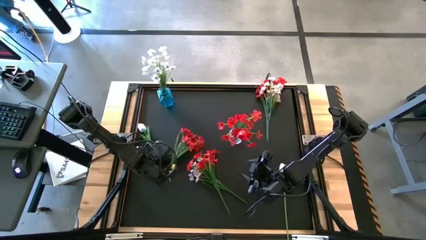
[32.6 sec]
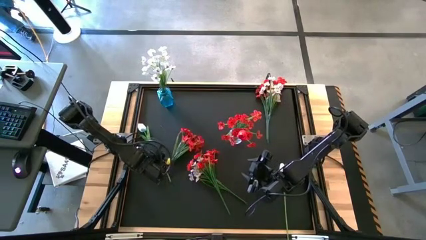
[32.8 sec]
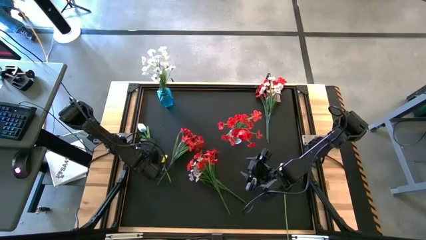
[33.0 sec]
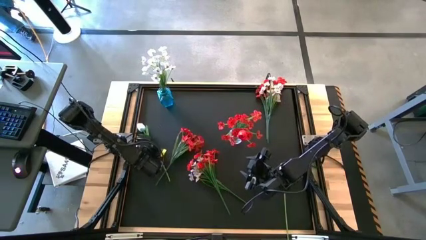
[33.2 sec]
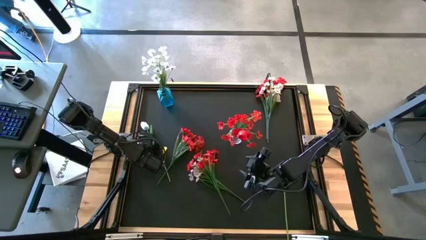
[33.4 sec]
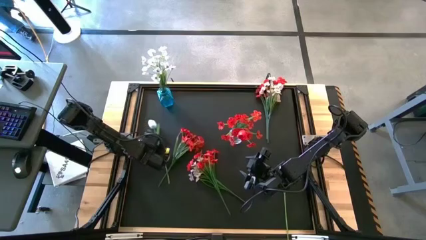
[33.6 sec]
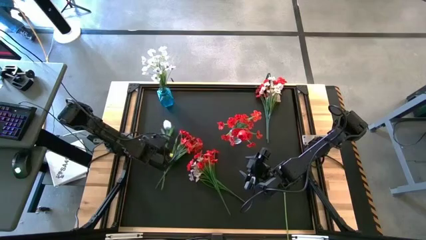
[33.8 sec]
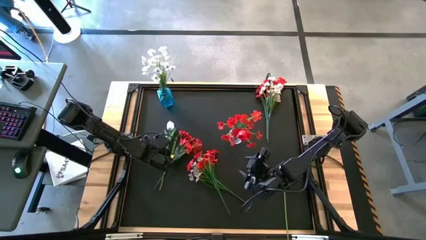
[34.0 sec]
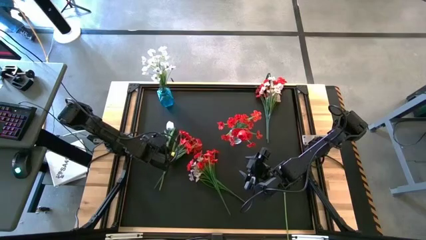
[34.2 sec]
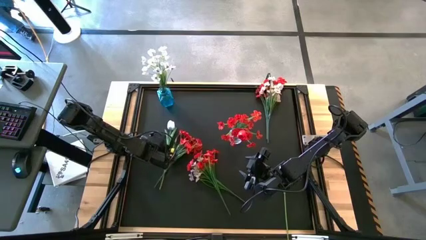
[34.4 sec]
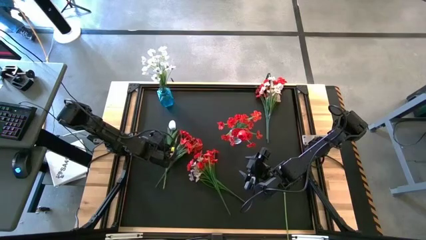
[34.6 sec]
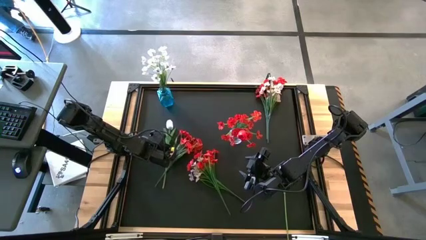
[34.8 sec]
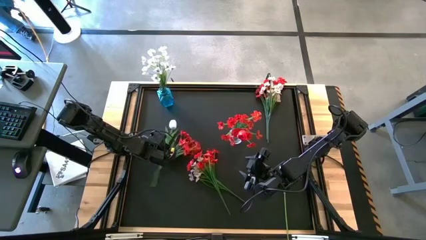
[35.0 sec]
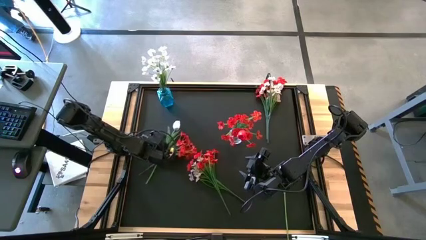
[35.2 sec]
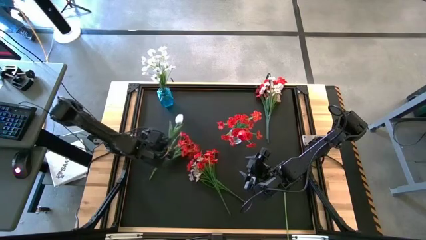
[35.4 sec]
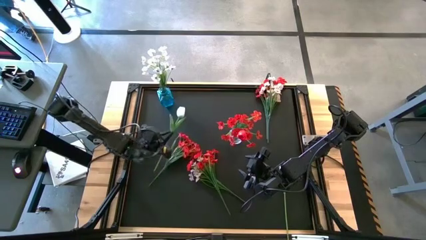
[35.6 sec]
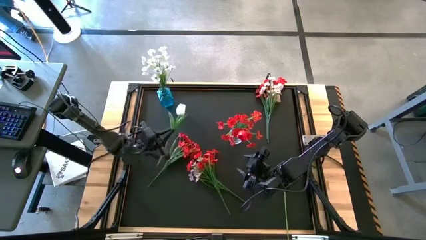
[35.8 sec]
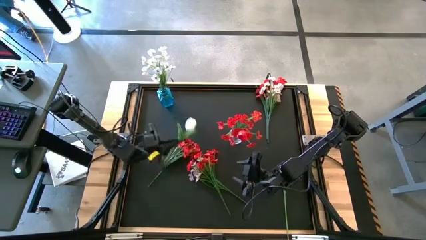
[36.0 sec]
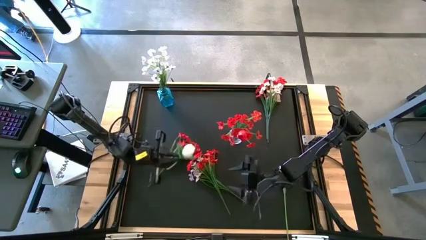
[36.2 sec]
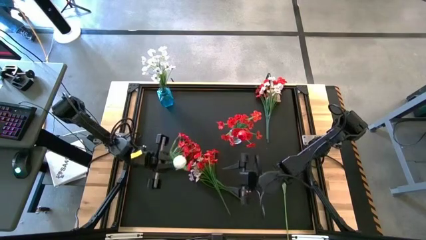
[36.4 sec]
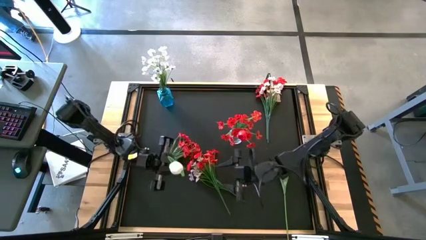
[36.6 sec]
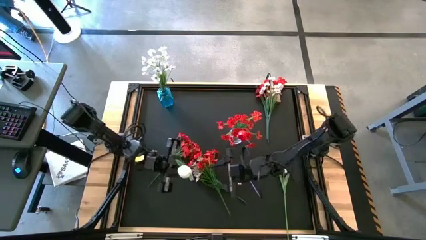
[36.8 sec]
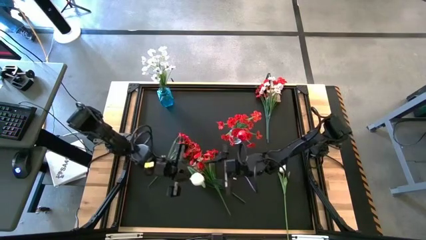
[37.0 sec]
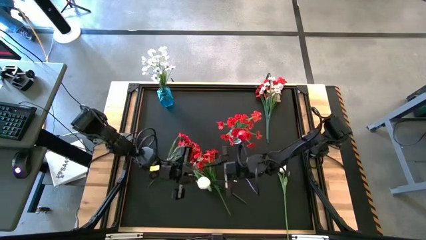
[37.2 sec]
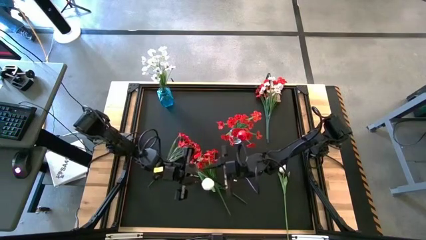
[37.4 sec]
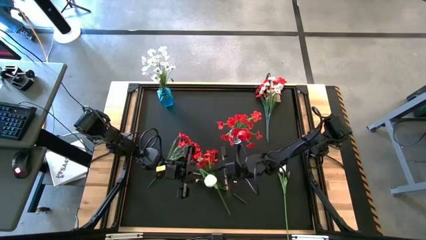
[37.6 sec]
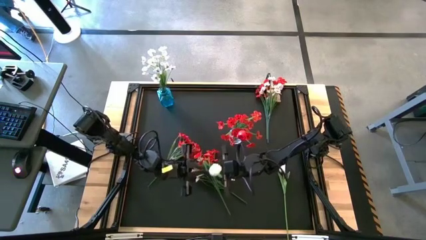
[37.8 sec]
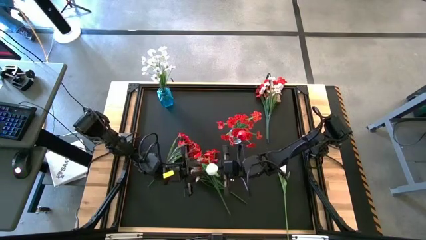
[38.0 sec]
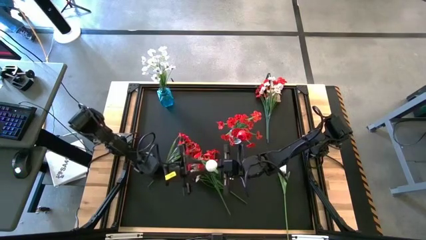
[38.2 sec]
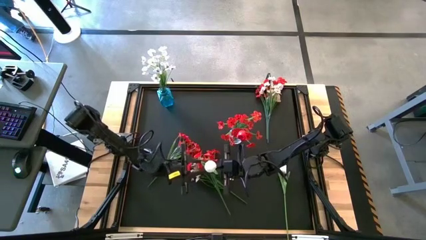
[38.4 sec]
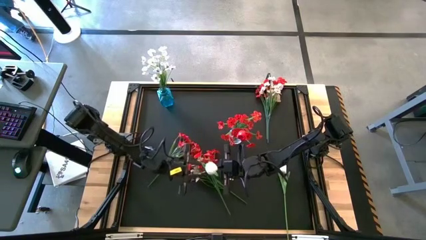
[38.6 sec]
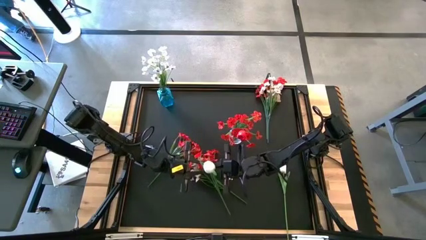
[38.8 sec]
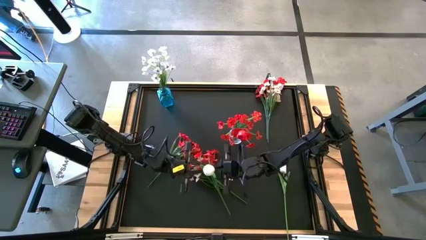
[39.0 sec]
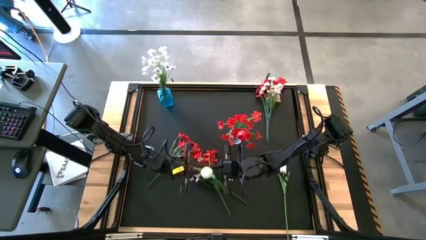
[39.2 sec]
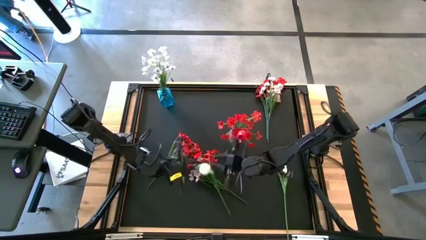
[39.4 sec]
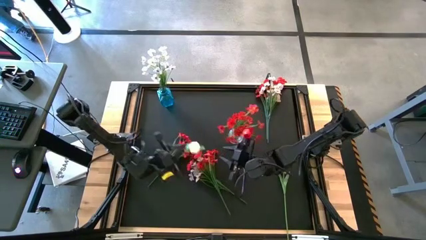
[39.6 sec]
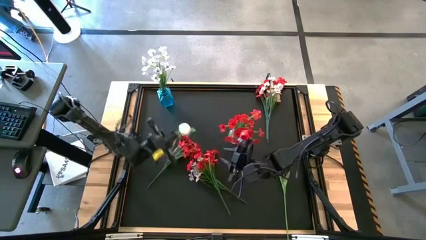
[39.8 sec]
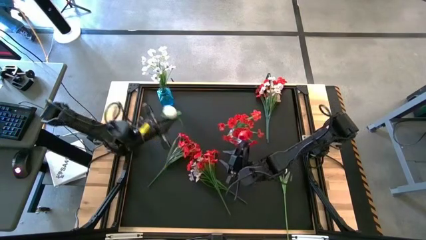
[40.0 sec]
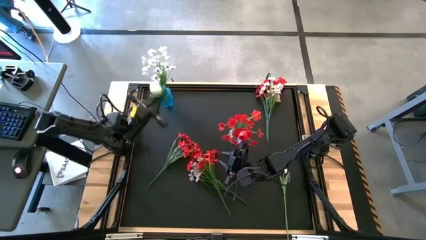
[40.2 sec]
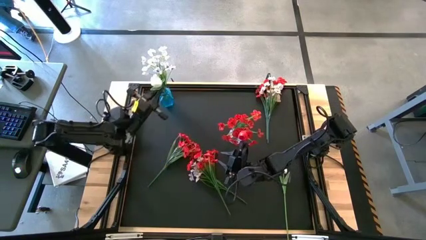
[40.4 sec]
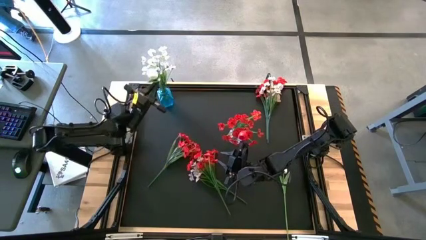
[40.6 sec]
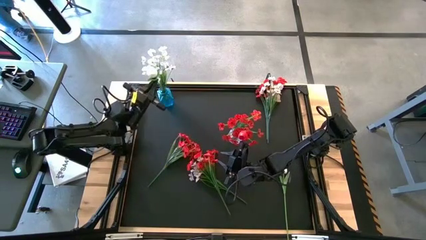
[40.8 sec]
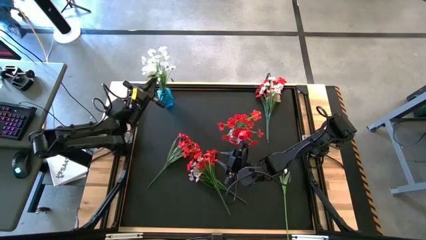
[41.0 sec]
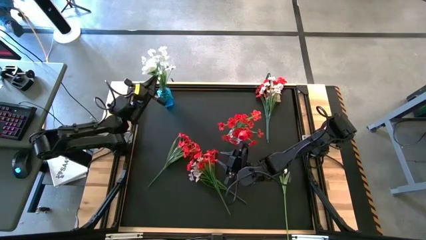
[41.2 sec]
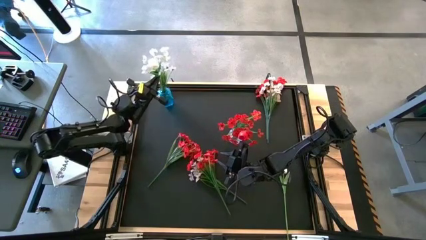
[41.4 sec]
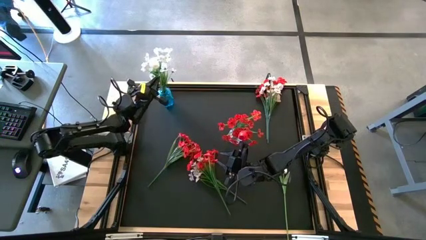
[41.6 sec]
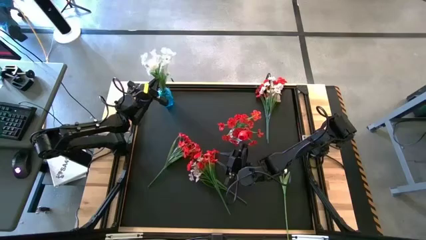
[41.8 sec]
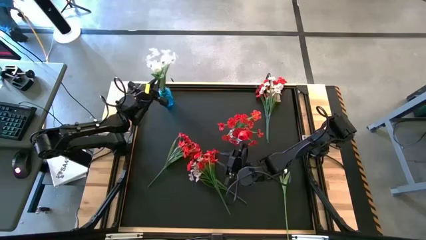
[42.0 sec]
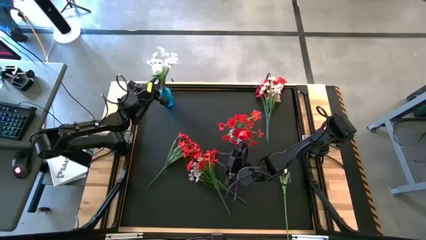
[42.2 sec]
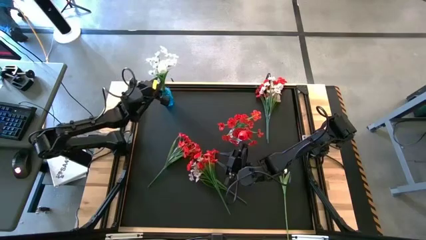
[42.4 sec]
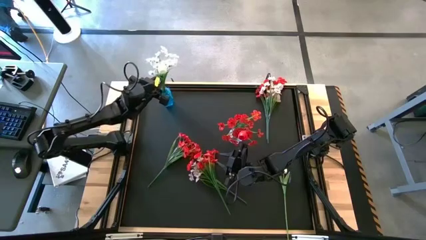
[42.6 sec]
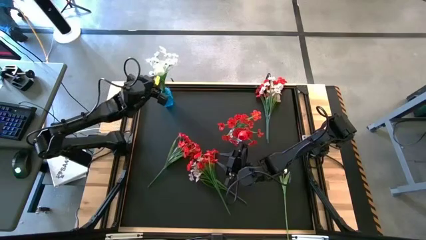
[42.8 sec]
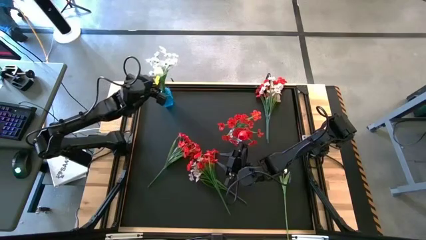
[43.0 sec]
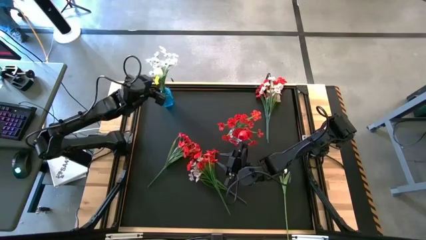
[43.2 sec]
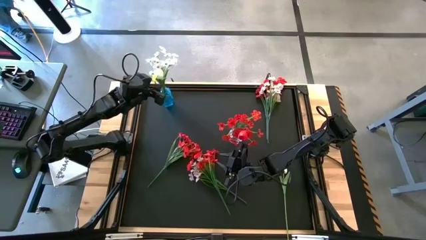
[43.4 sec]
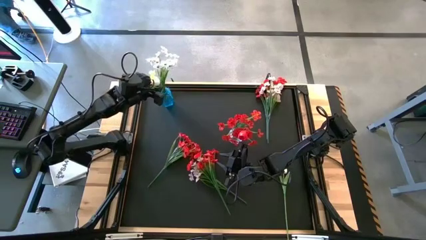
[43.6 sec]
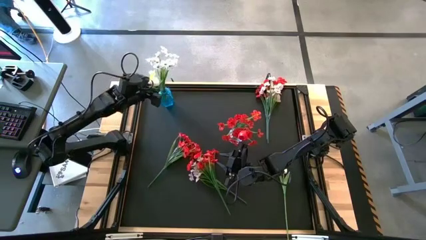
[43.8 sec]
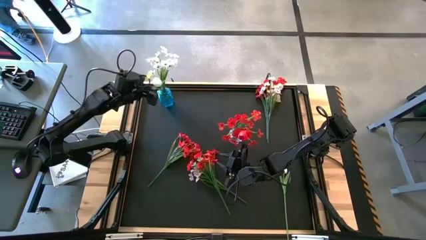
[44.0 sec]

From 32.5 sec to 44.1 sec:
Task: Sort flowers into vase by color
Put the left white flower into the blue vase

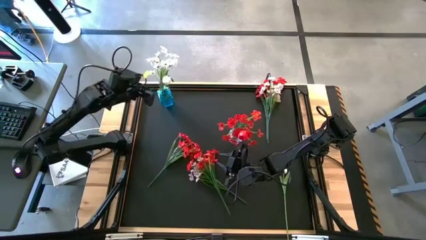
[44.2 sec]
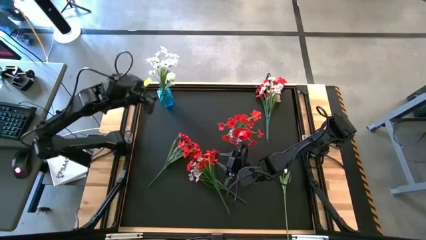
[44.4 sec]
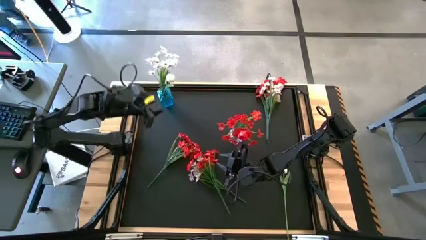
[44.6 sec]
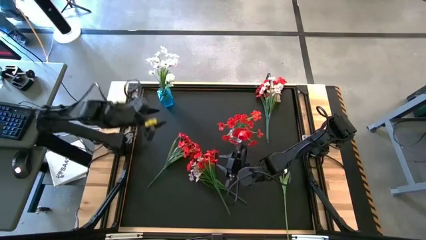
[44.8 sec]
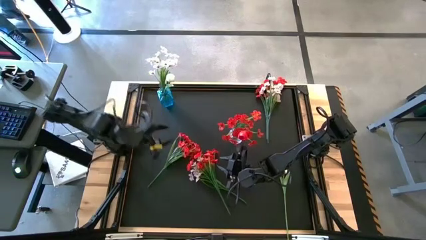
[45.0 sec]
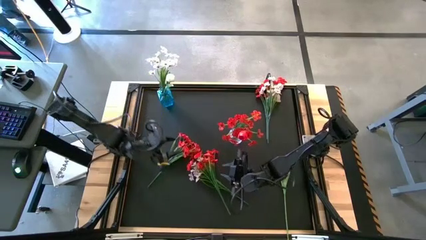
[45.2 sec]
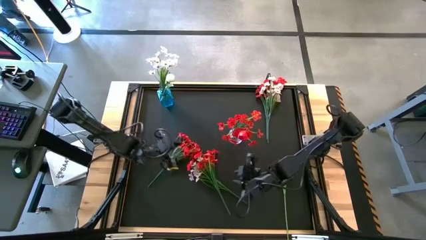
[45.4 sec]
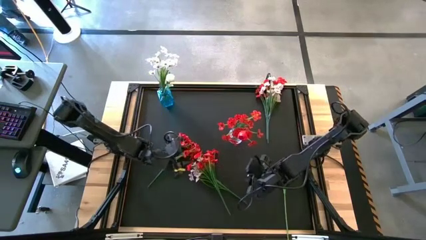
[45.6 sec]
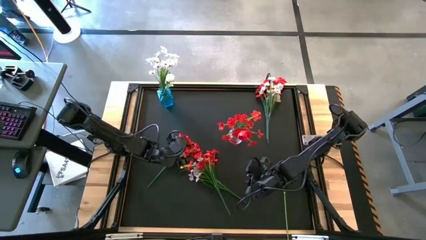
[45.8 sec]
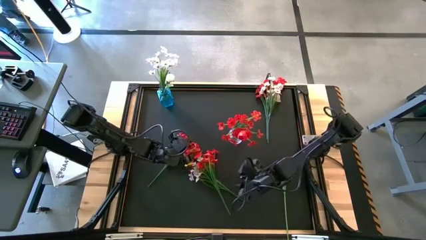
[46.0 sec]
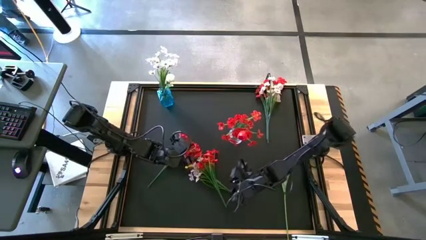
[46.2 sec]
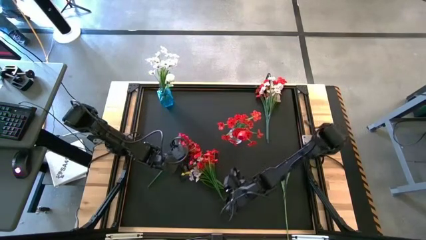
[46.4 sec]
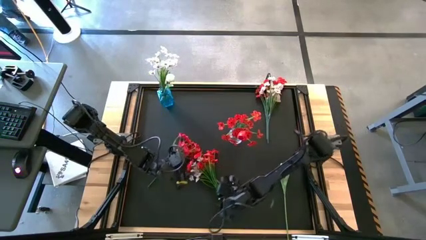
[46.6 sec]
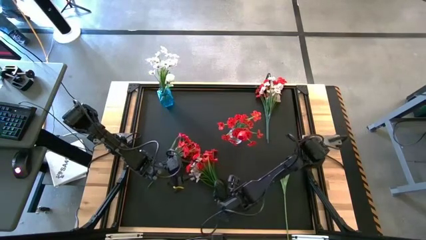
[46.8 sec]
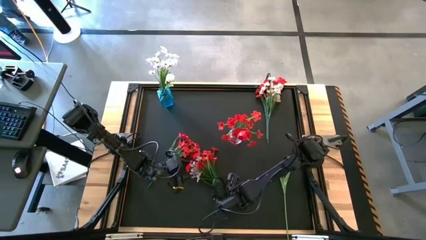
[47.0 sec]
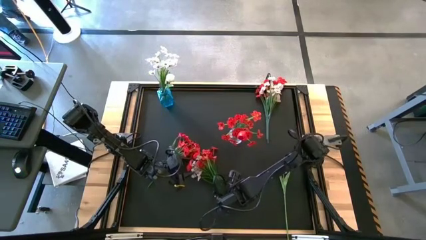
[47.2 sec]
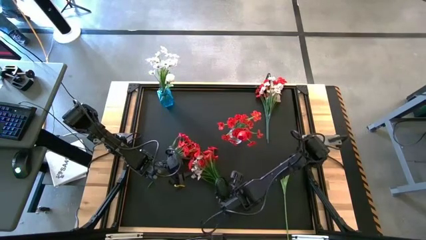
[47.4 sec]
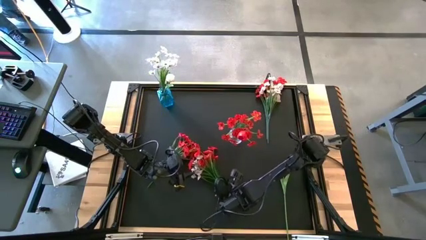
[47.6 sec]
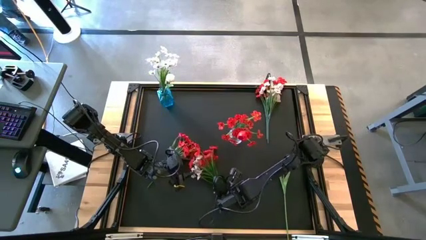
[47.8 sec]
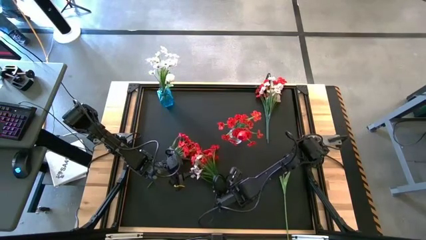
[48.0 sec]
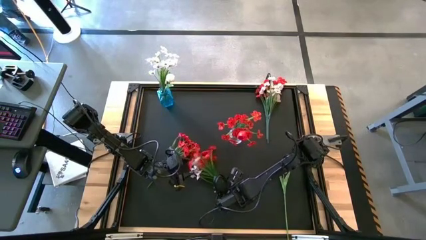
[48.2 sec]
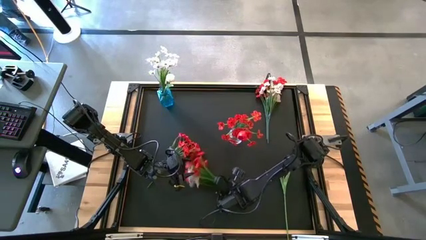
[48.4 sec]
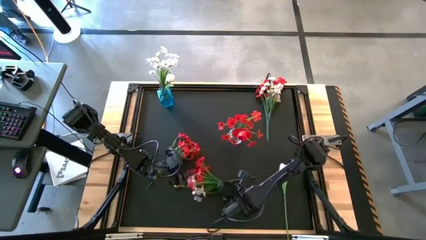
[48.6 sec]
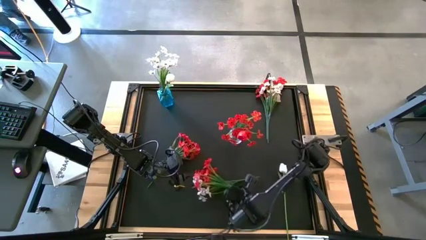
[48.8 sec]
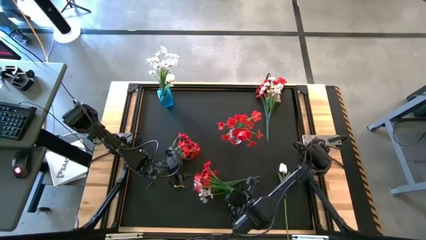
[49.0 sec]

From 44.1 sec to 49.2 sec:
Put the bottom right red flowers into the transparent vase
